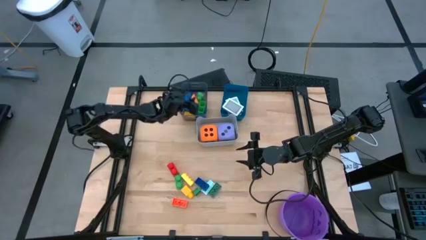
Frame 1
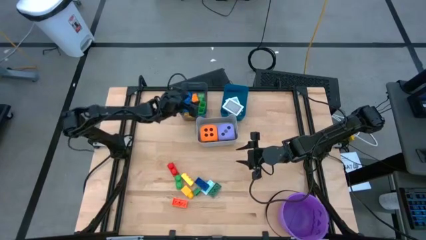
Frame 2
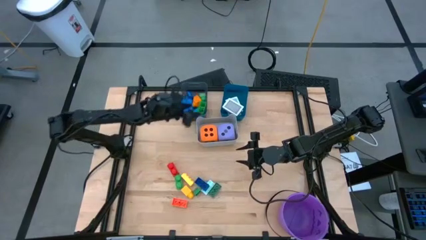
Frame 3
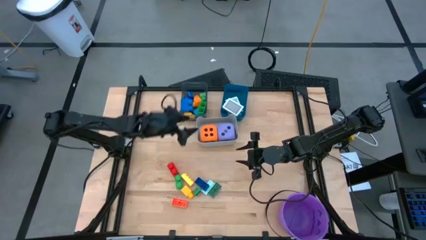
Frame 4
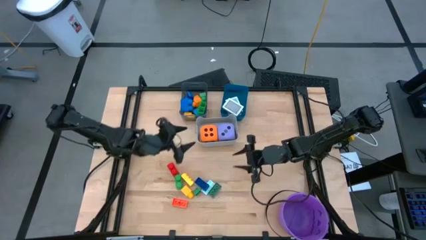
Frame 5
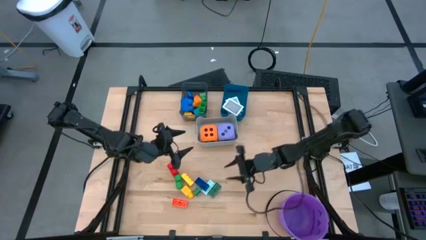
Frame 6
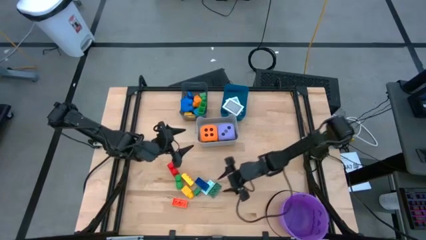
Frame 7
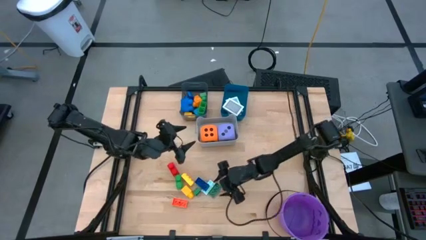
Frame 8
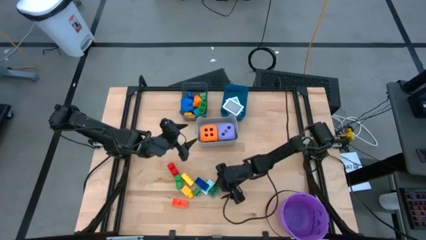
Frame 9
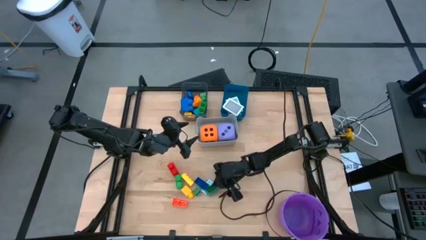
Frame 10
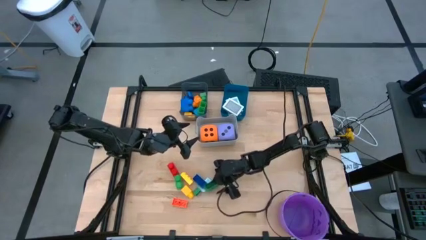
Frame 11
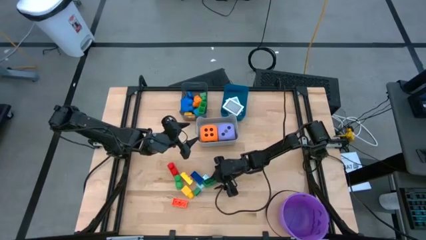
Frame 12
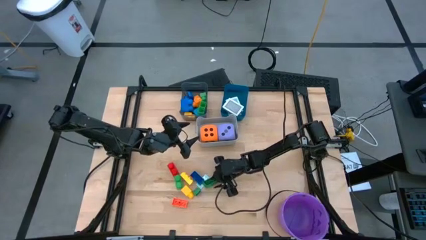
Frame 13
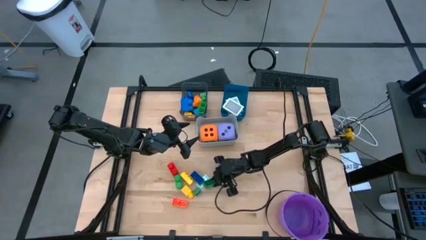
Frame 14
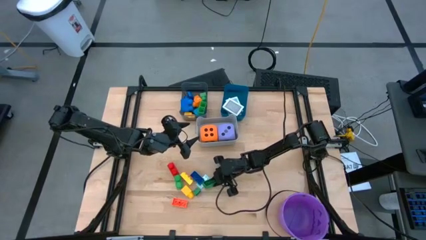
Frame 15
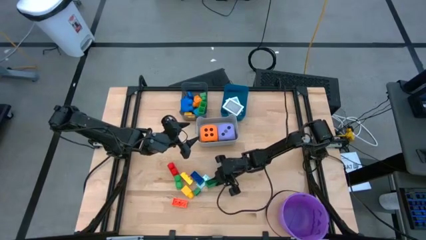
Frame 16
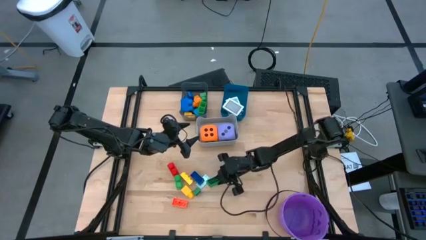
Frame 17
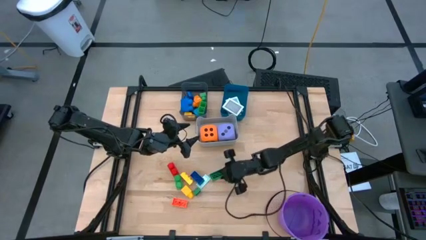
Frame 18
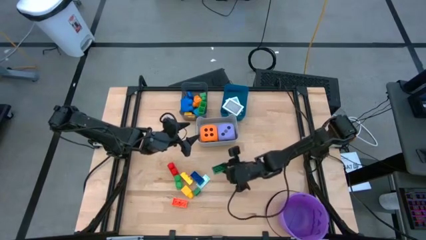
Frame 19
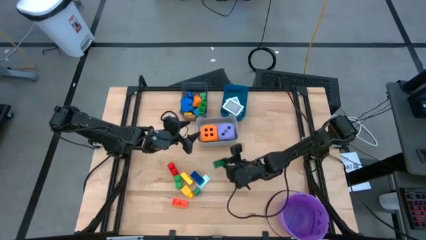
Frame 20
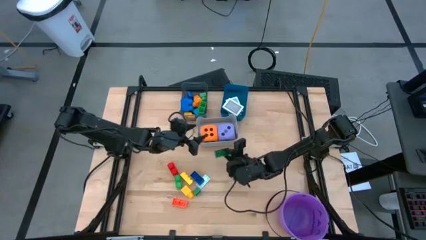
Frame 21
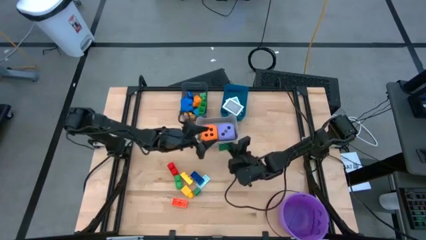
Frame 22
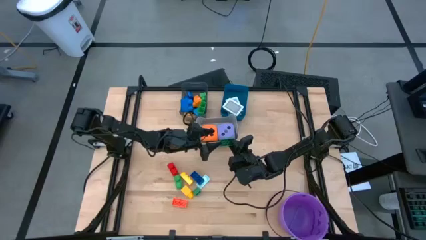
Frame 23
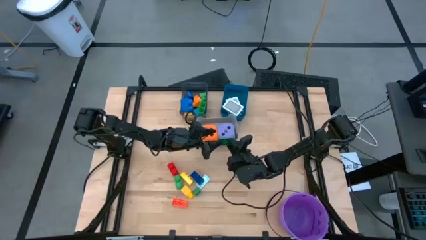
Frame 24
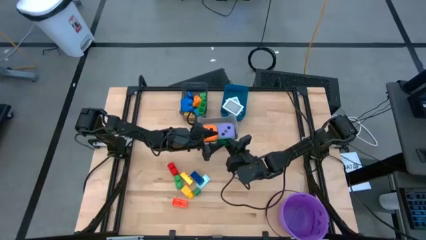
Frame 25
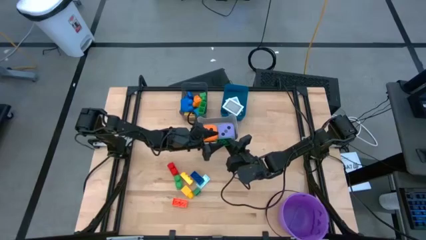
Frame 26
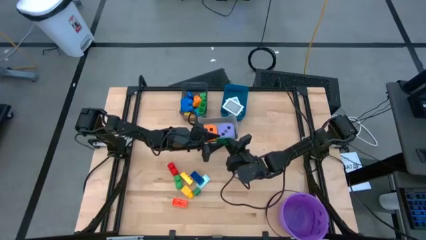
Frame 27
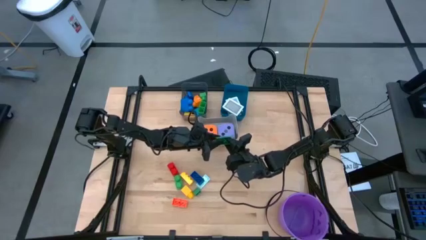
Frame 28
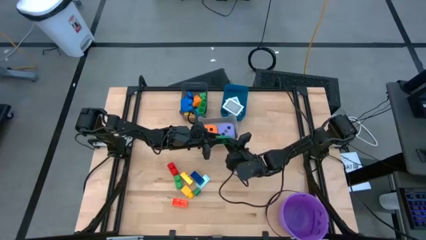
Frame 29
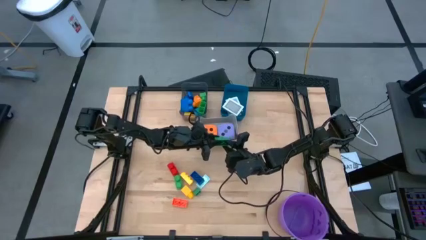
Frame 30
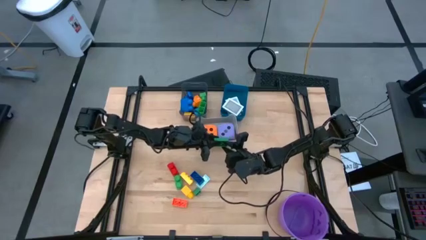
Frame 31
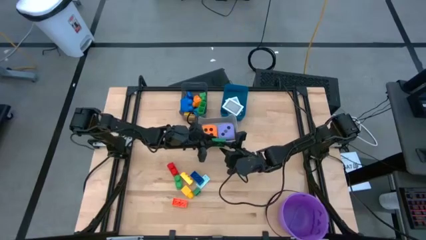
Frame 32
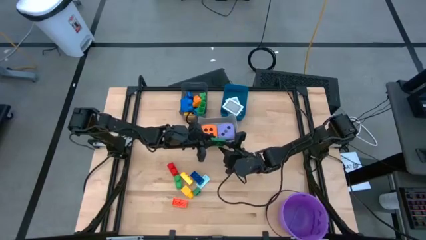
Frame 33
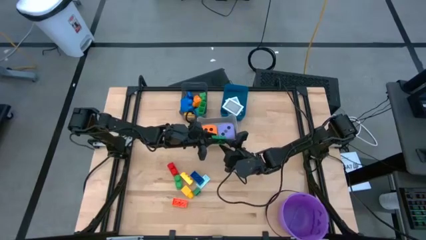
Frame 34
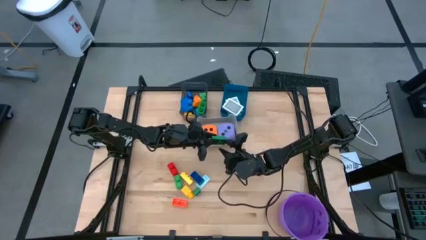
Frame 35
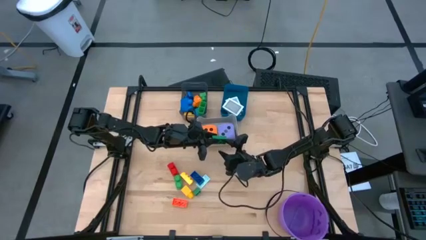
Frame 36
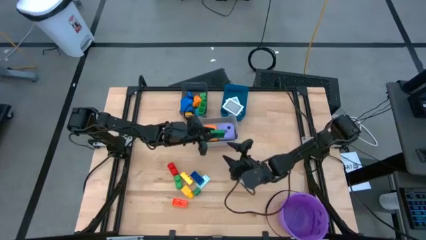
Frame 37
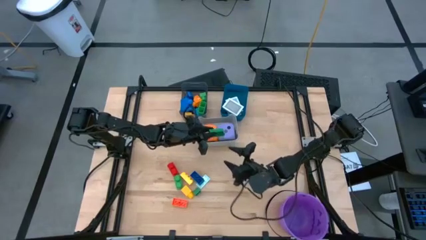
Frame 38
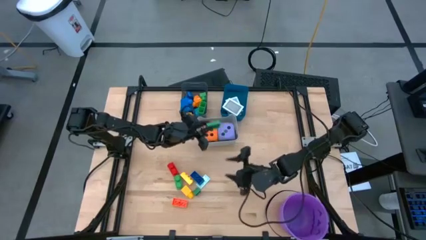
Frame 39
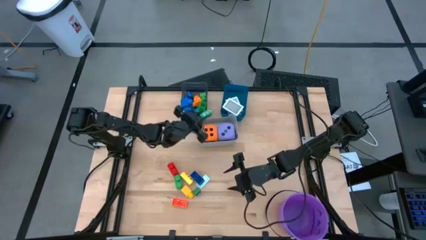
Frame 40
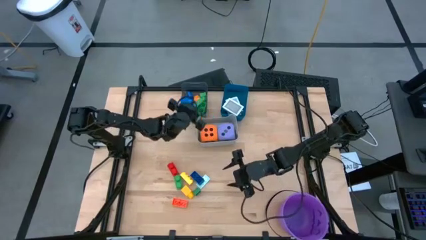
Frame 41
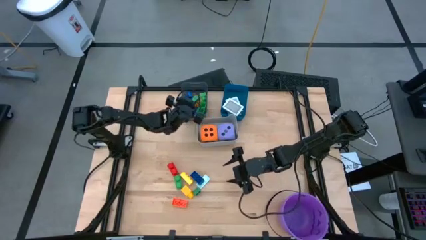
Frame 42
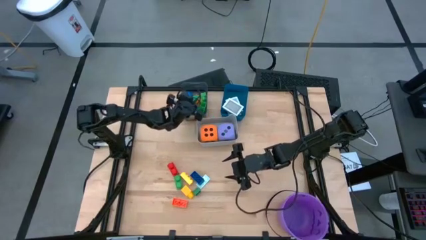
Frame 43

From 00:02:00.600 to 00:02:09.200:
Task: Pick & Place Toys
Put the right dark green game piece into the black bin

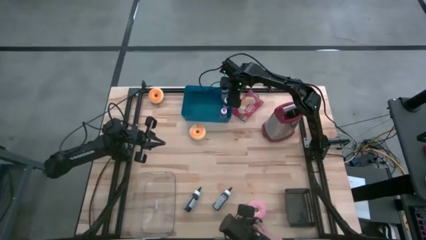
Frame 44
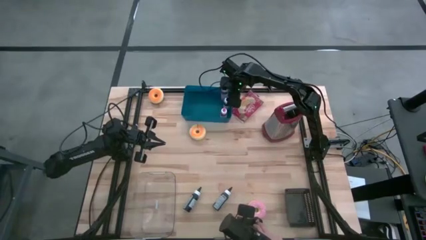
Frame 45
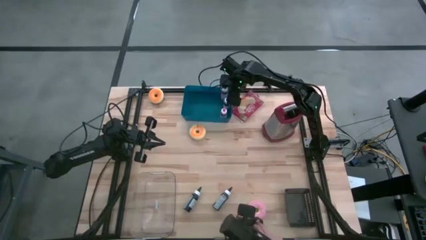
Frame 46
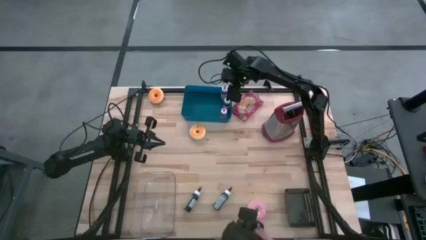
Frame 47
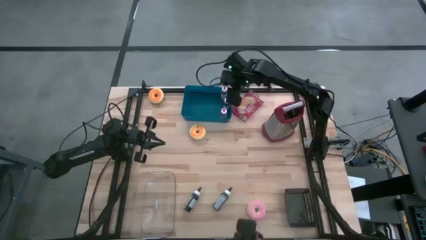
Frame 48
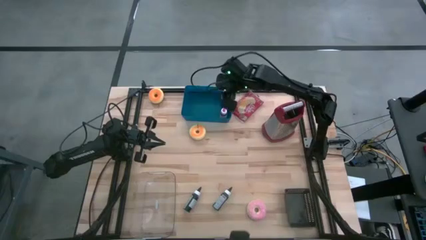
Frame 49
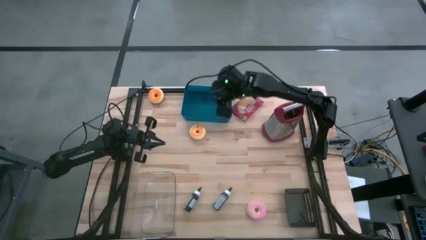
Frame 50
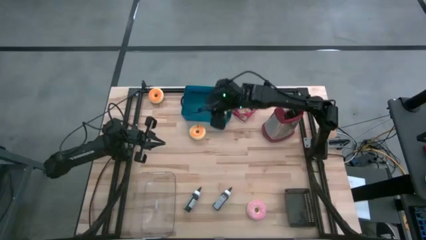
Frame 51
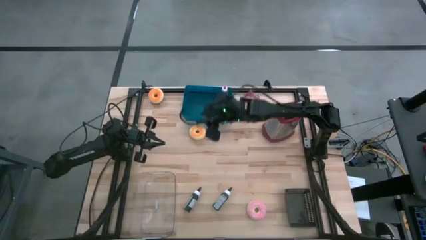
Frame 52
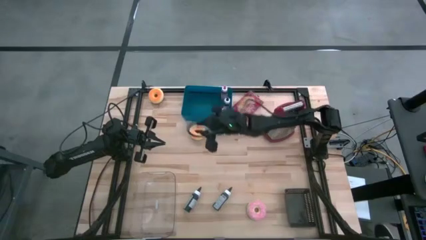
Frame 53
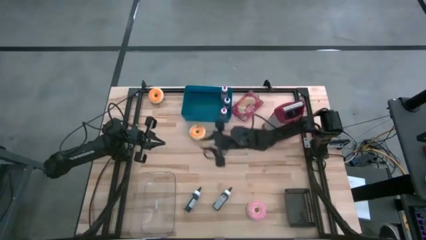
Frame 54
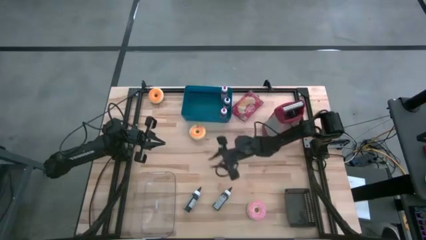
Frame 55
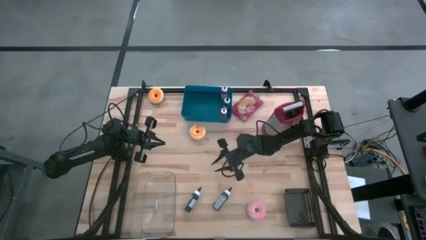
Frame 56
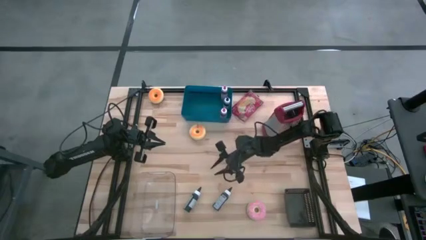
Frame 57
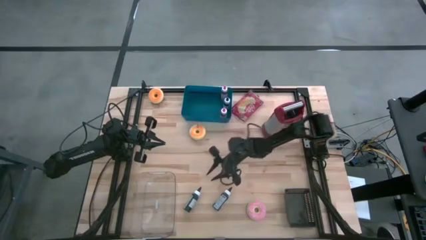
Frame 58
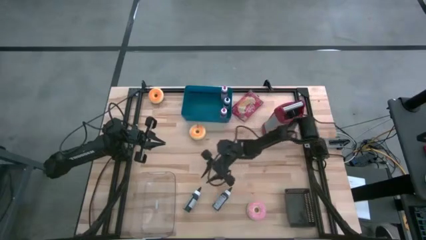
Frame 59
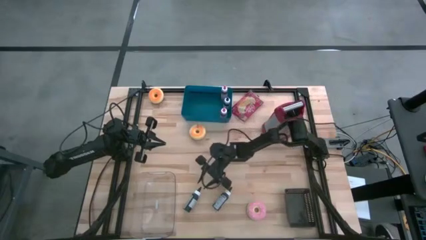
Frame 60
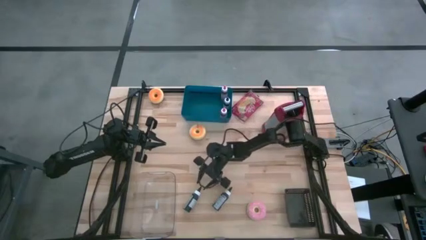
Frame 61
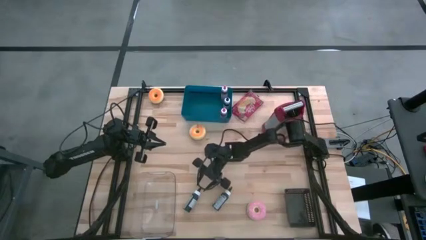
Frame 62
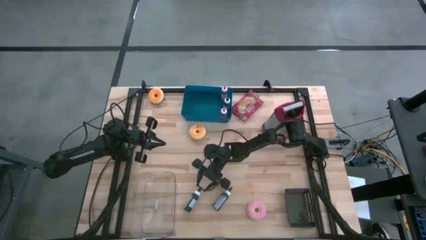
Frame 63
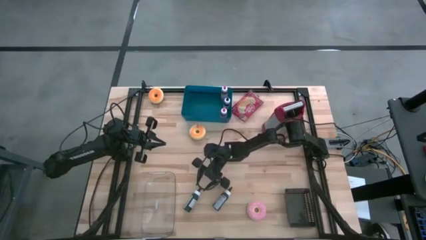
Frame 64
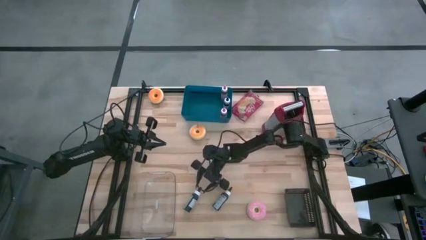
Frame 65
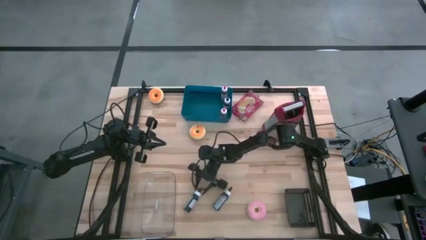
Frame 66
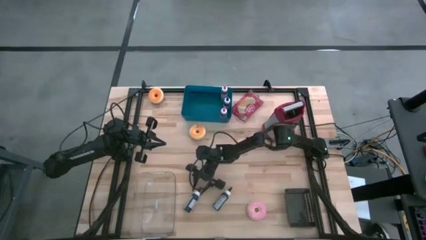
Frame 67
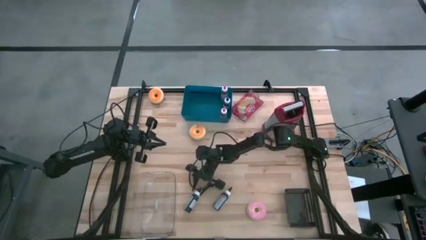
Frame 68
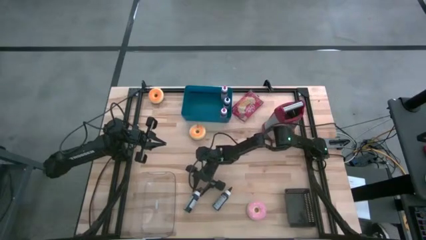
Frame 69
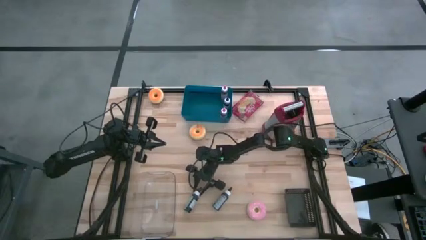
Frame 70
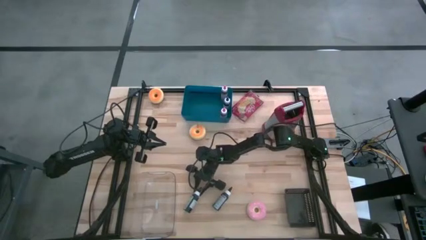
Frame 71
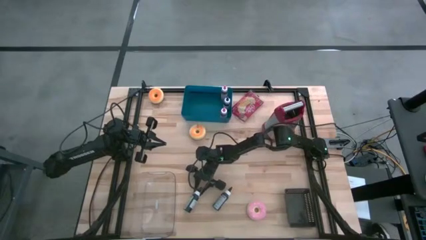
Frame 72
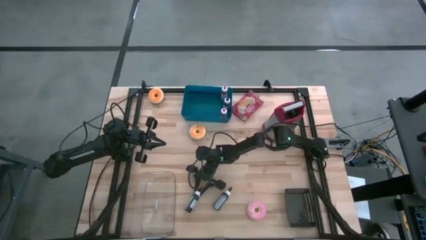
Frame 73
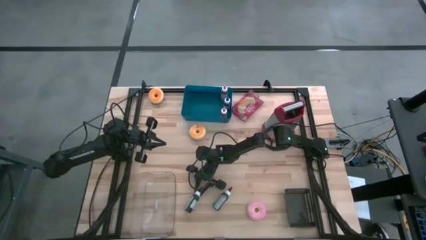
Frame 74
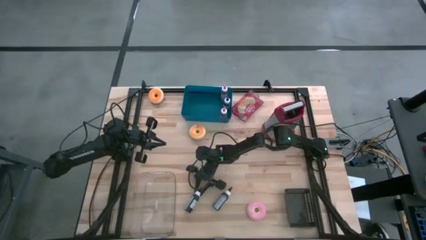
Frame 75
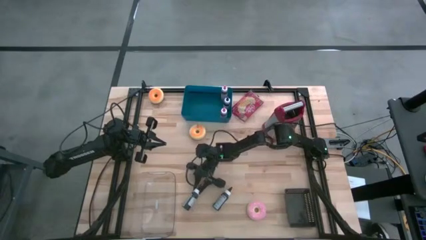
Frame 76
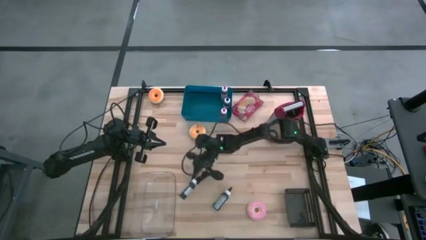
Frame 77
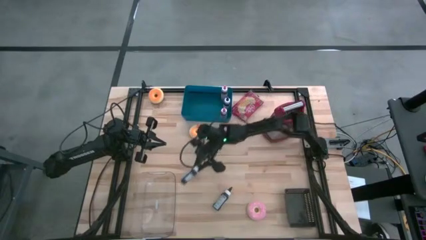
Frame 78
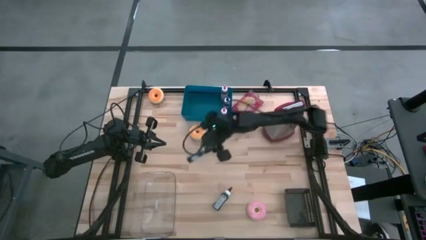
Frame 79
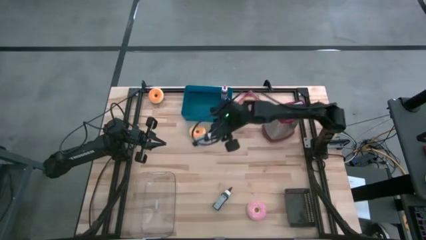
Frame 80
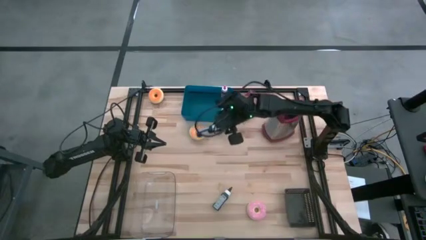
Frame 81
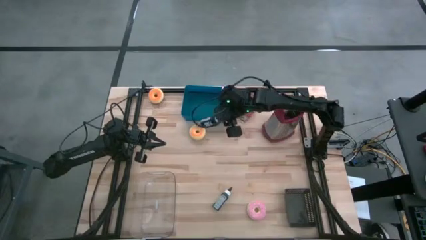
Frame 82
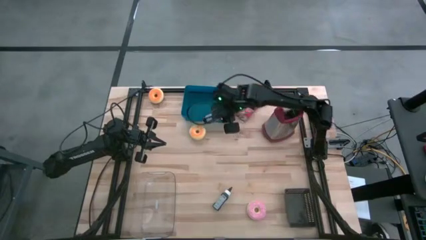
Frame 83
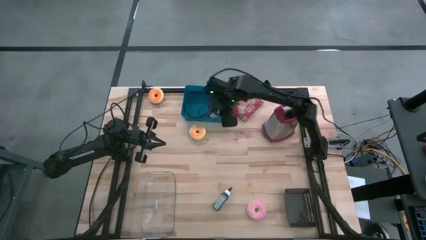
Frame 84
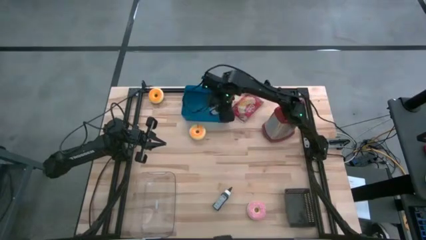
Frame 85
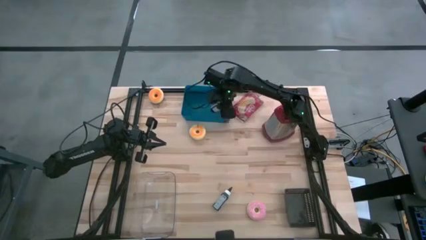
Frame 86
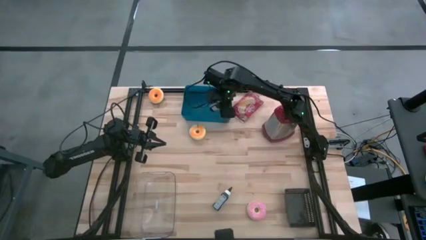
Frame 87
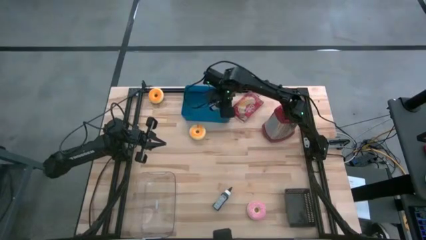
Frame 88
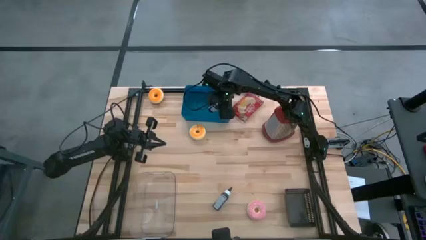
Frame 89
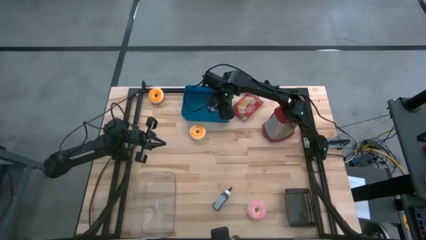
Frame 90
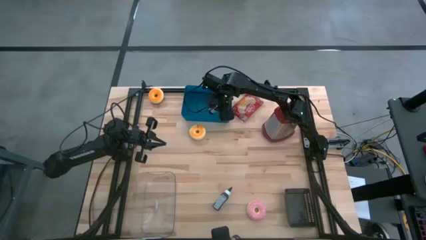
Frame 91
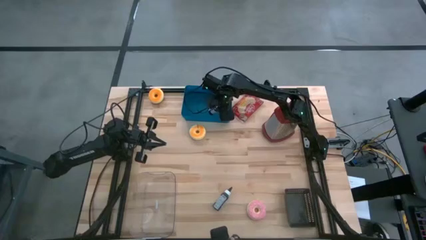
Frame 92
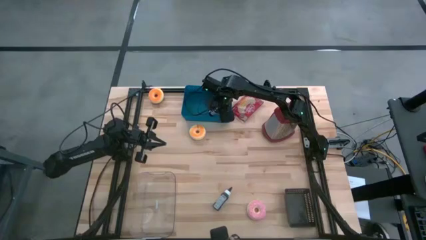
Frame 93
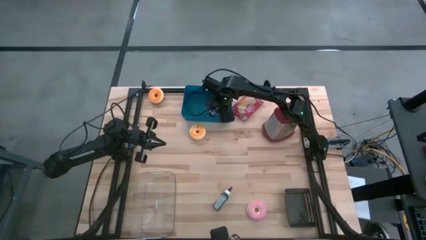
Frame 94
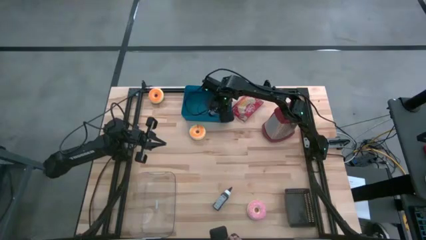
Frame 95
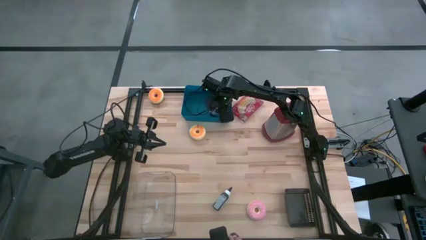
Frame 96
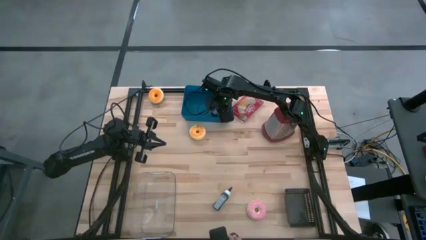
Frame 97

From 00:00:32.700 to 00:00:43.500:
Task: Pick & Place Food Item
Put the left black food coloring into the blue bin
